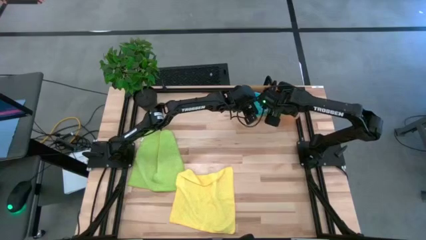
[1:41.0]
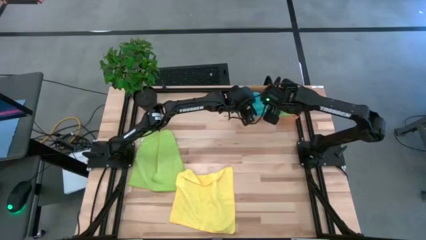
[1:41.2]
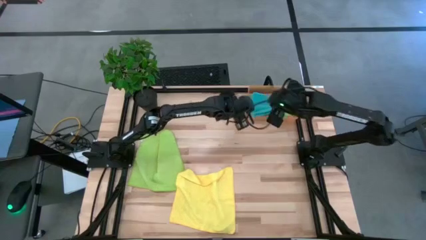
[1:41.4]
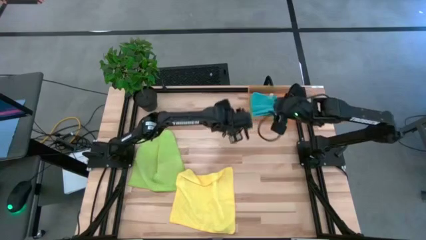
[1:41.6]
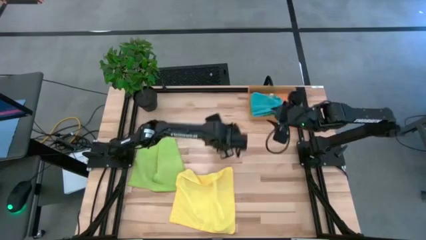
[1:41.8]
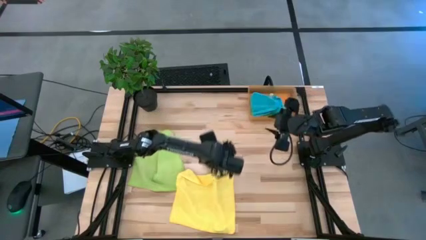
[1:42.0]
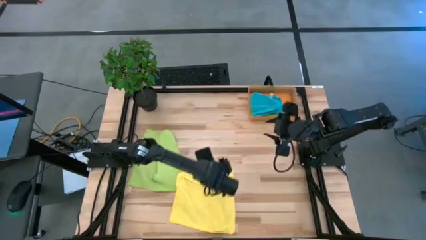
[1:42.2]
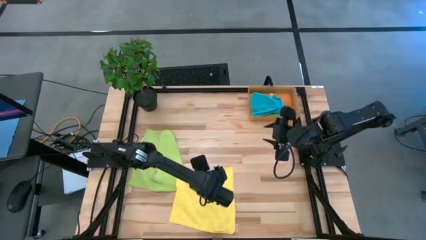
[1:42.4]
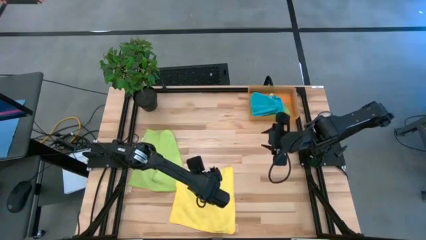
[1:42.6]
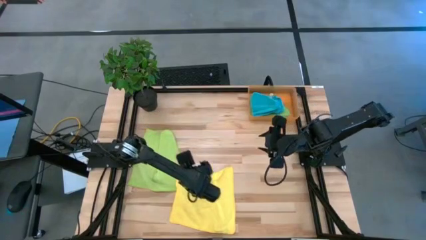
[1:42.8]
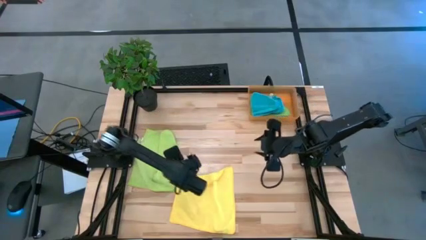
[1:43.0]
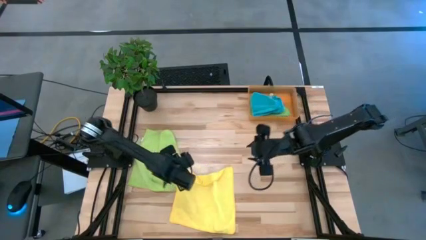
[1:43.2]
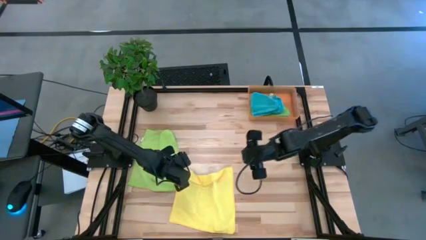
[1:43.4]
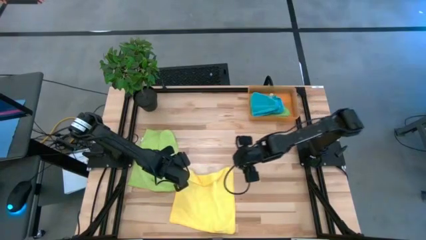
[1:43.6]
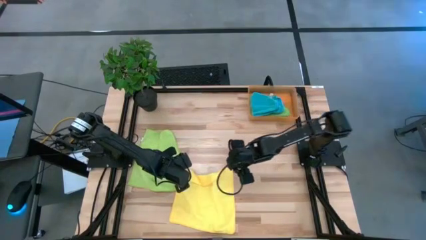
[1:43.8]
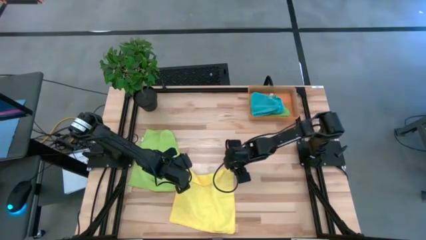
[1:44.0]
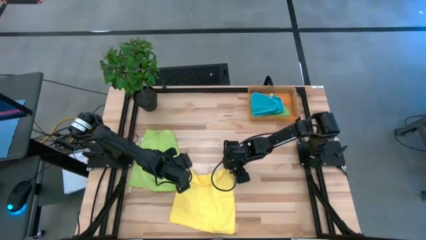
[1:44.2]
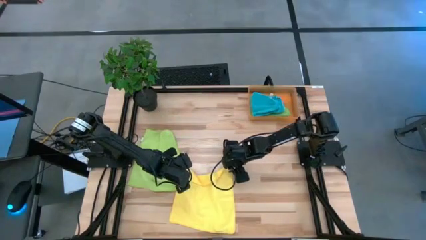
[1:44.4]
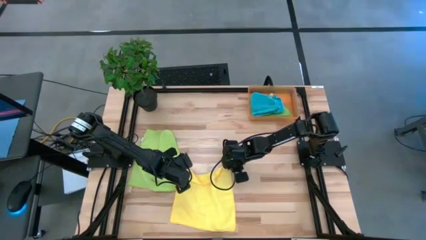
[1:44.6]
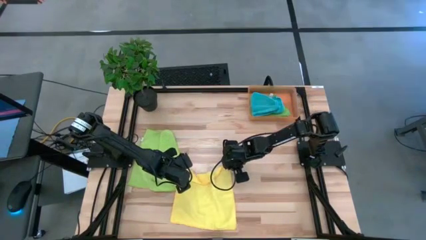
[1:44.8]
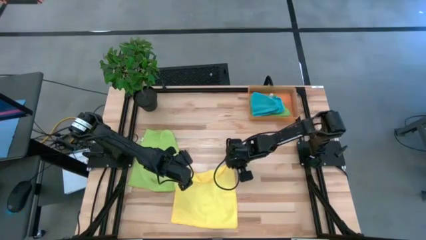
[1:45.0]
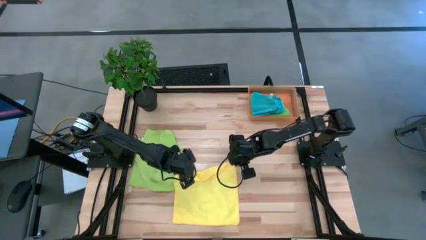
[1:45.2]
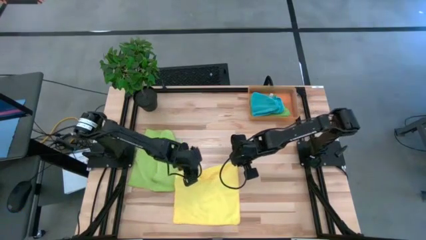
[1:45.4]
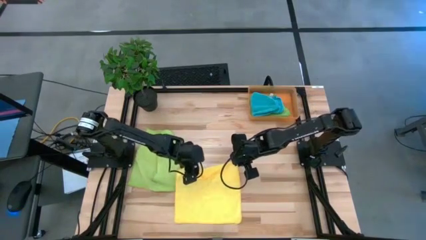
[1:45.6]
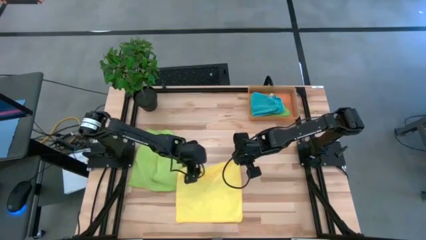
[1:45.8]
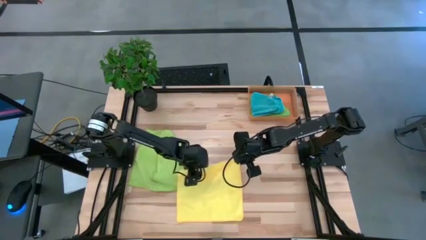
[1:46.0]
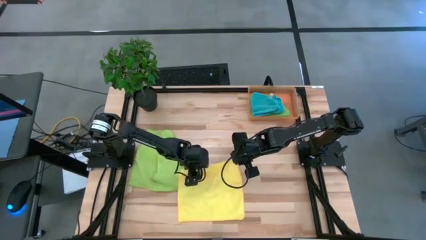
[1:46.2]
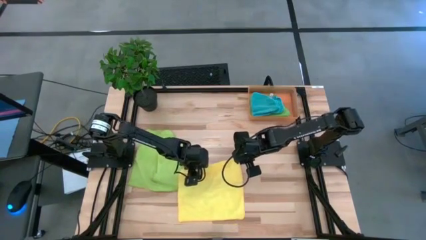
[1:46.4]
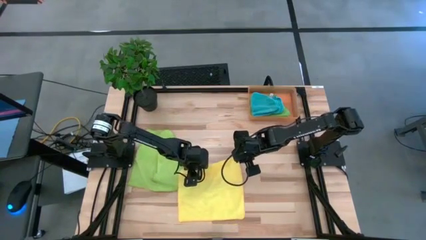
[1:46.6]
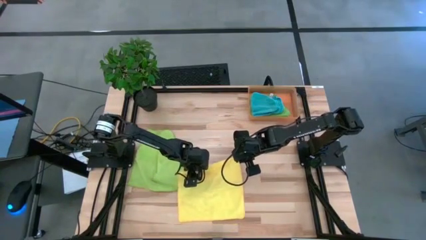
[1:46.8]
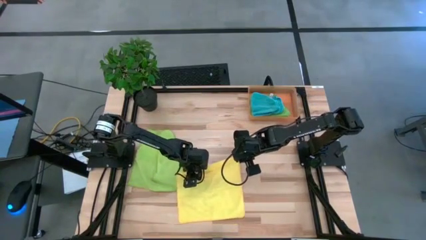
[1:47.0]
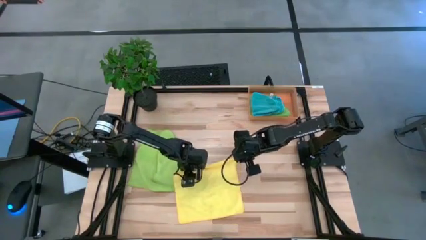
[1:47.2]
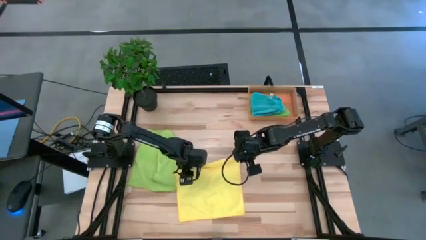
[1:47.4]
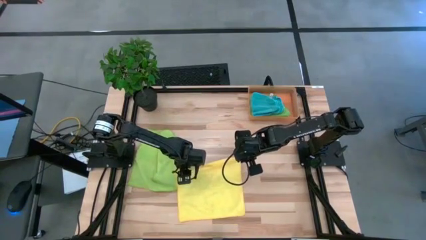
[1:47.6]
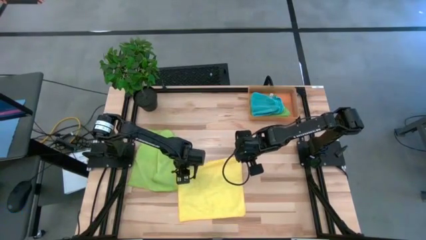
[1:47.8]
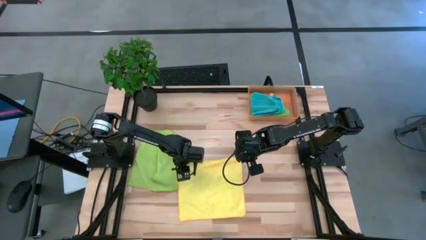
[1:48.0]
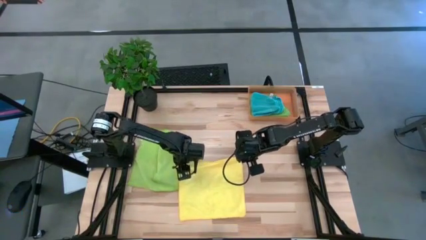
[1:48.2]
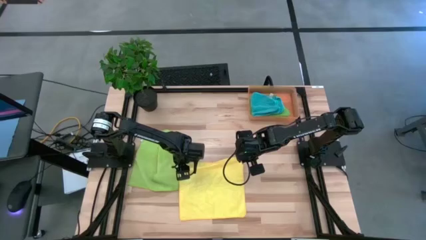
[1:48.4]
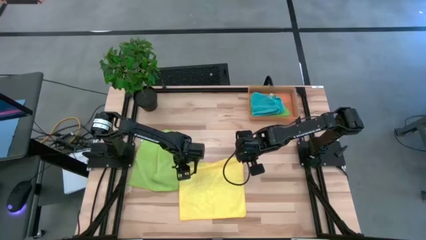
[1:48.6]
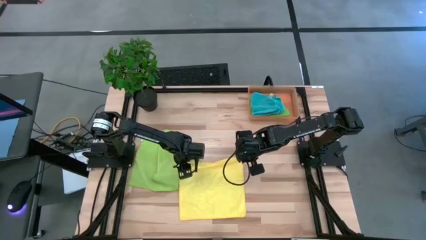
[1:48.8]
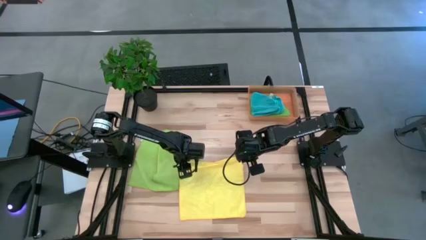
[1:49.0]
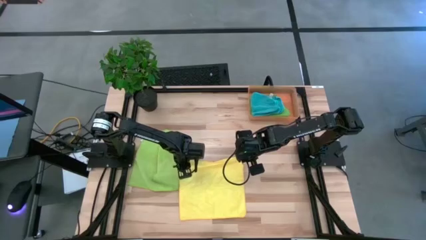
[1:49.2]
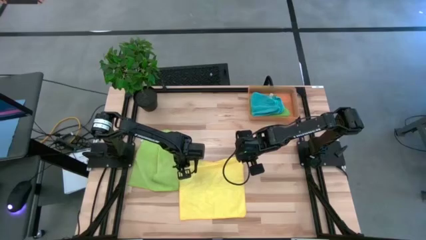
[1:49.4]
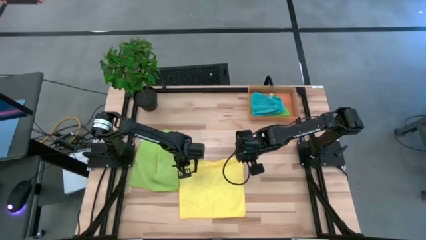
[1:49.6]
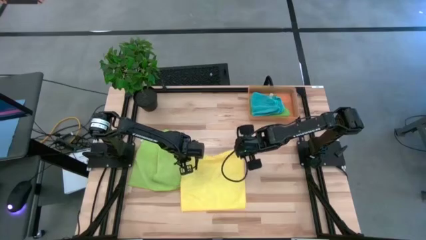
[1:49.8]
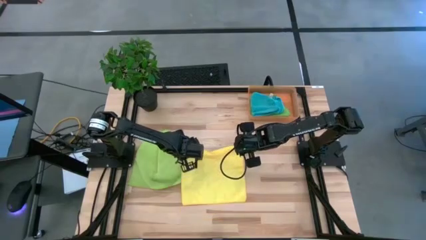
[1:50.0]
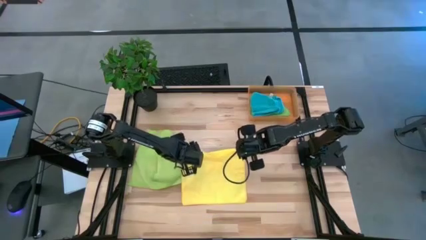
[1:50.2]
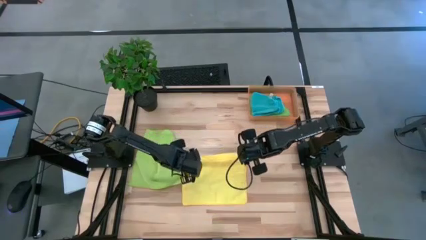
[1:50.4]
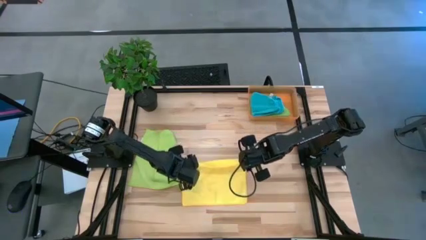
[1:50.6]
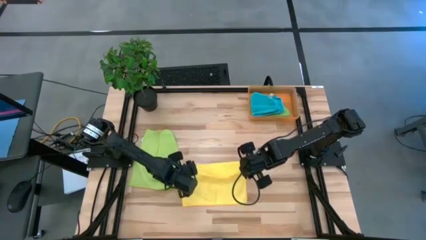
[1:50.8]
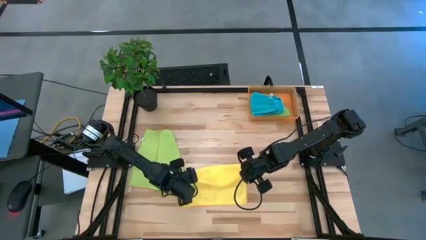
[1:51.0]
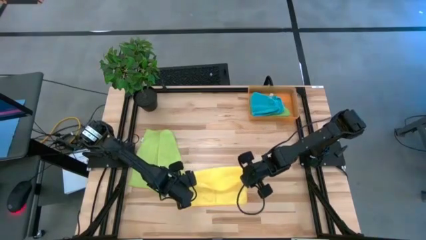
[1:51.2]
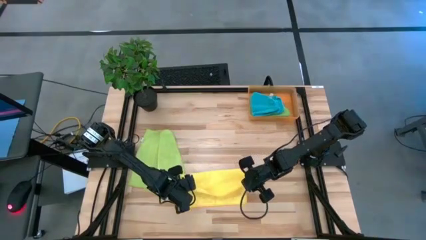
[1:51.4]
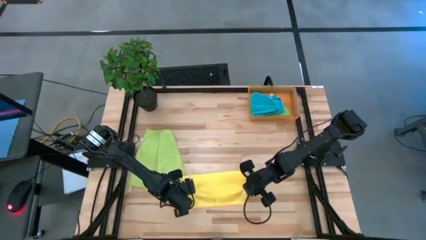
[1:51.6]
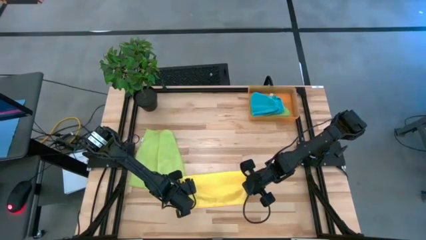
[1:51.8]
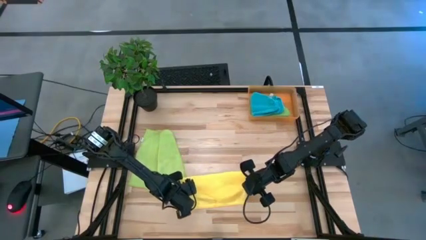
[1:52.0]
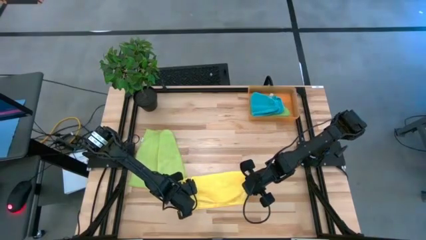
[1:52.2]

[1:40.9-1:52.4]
Task: Fold microfiber towels
Fold the yellow microfiber towel
